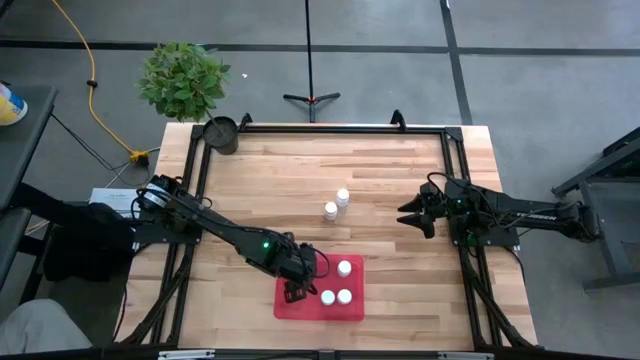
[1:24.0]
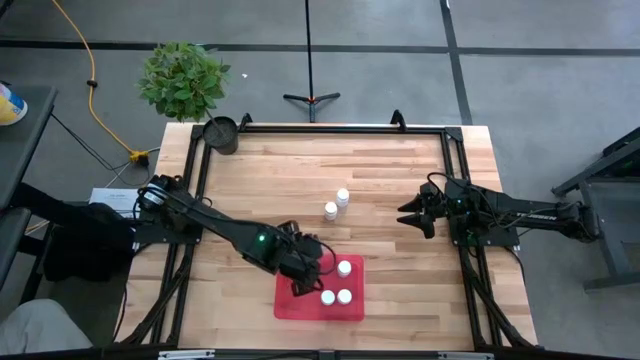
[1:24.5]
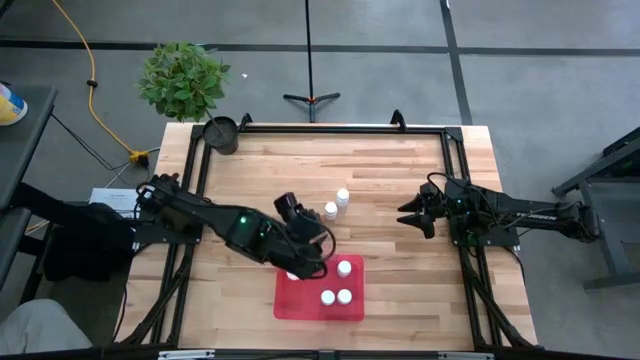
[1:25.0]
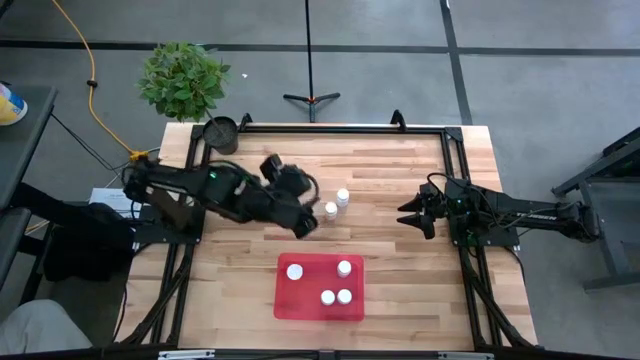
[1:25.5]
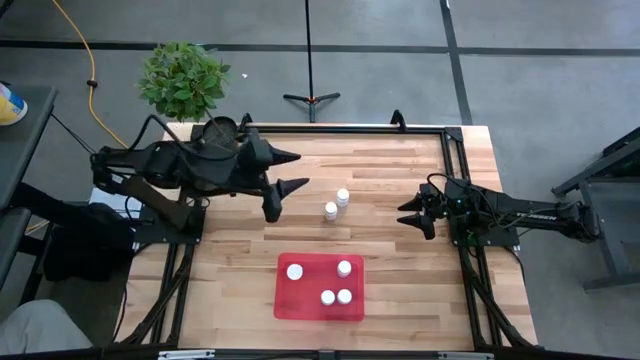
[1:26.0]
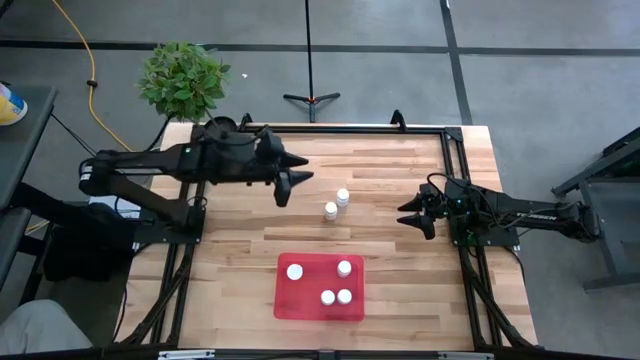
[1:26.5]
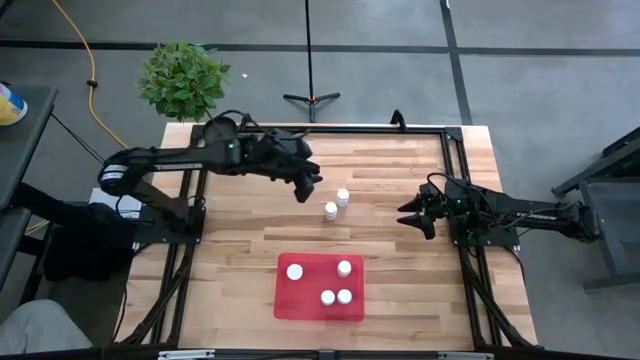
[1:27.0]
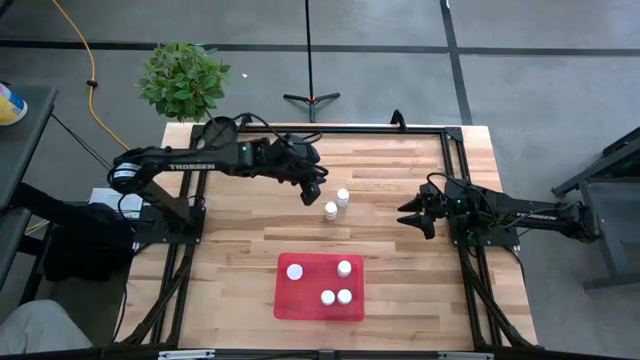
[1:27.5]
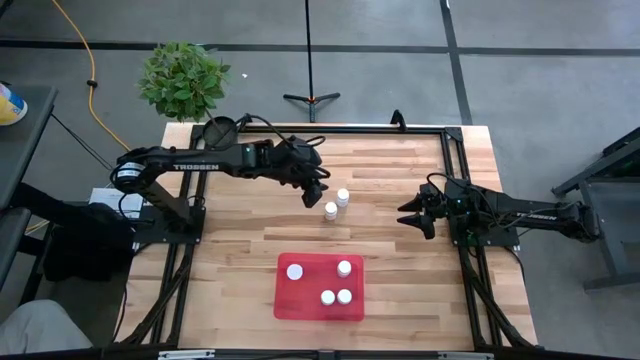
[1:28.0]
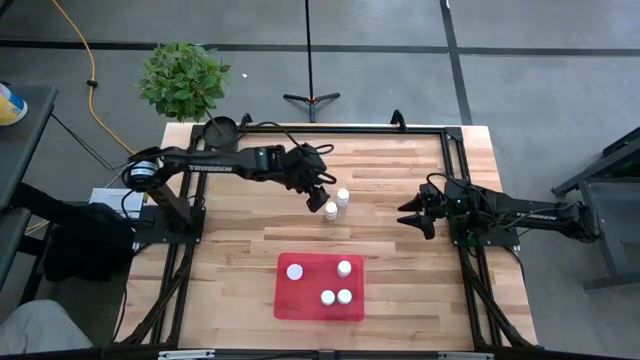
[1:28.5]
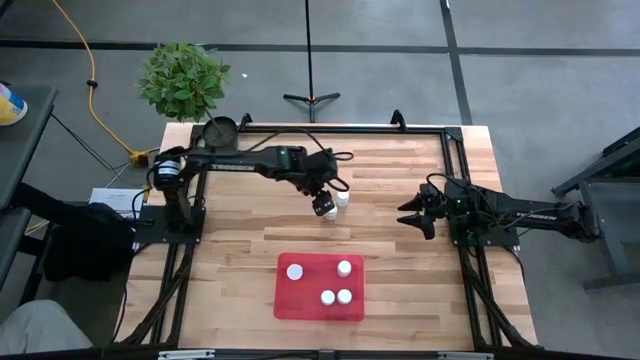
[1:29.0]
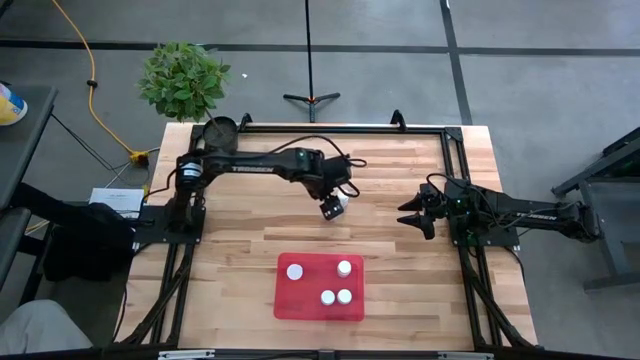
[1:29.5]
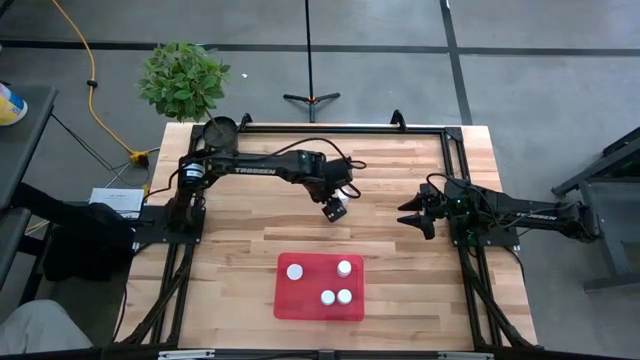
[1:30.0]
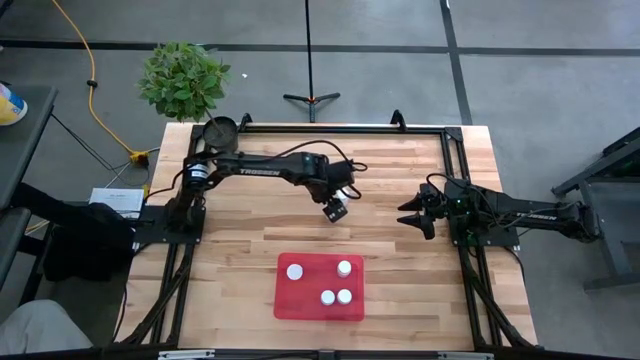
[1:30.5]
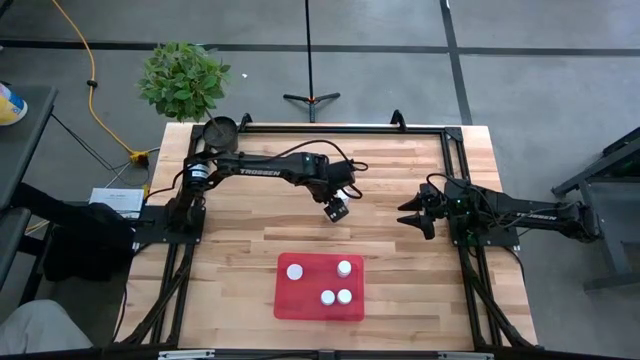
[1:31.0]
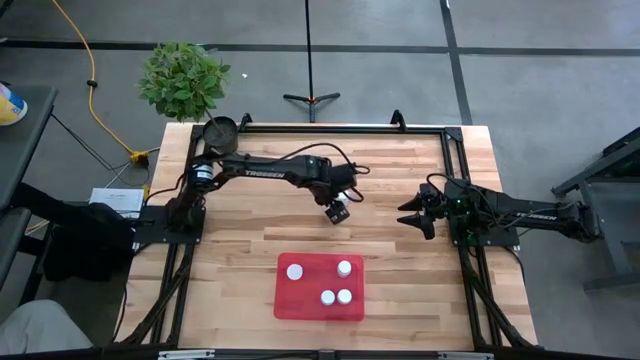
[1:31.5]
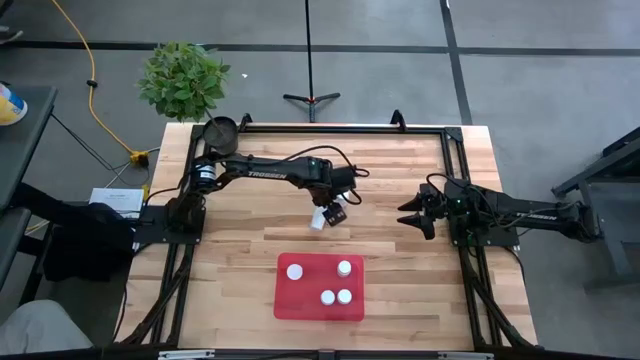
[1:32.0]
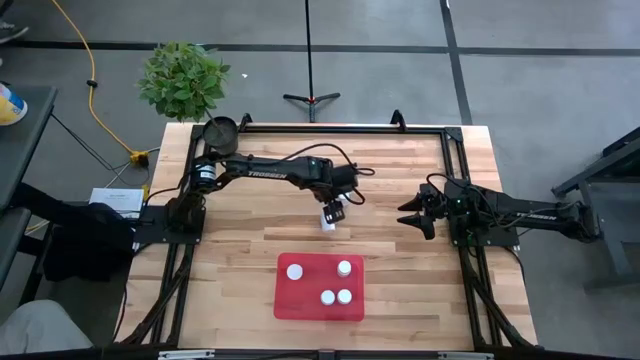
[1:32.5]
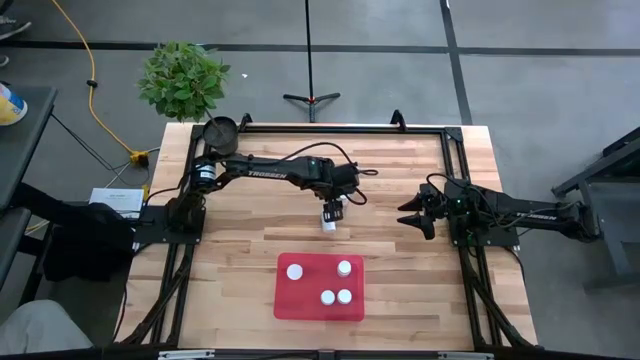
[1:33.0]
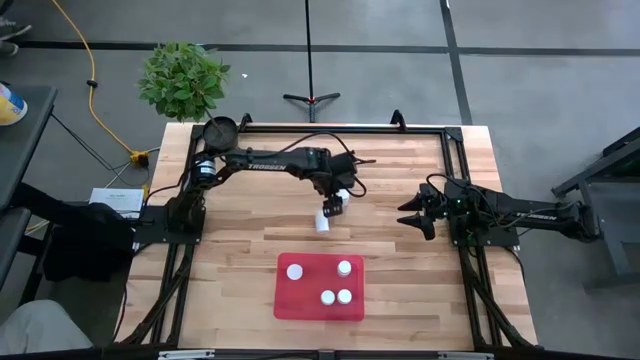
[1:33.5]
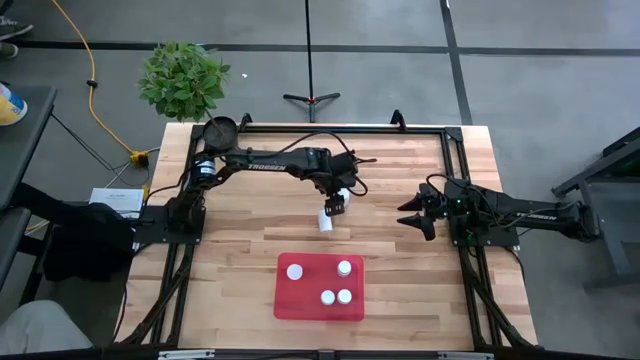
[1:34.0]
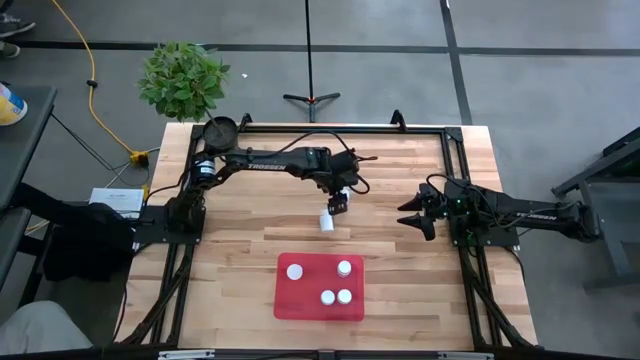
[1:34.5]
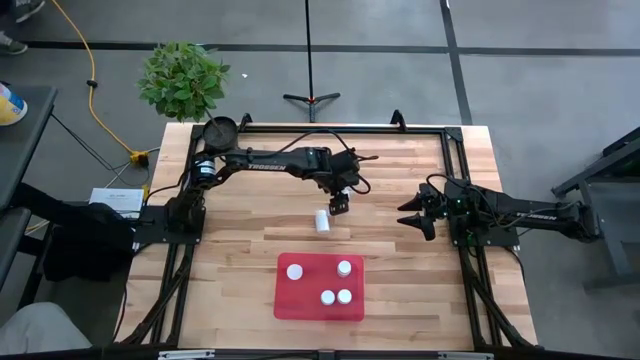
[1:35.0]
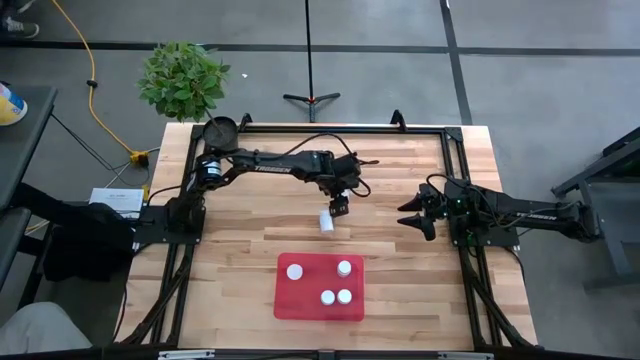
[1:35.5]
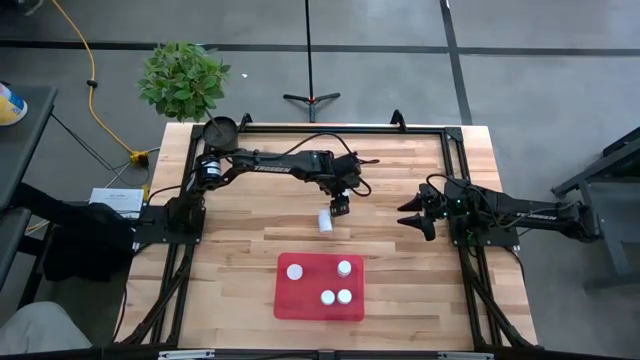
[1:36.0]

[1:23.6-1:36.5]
Task: Pick and place pill bottles into a basket
Put the bottom white pill bottle into the red bin

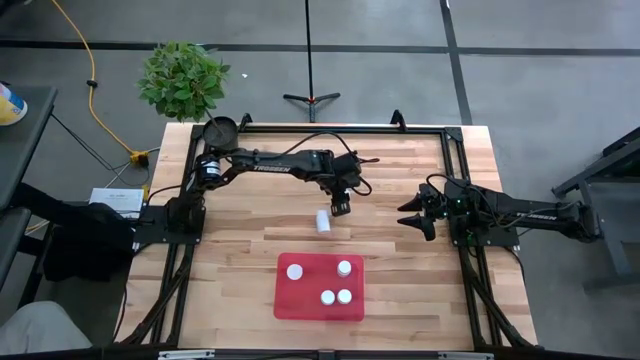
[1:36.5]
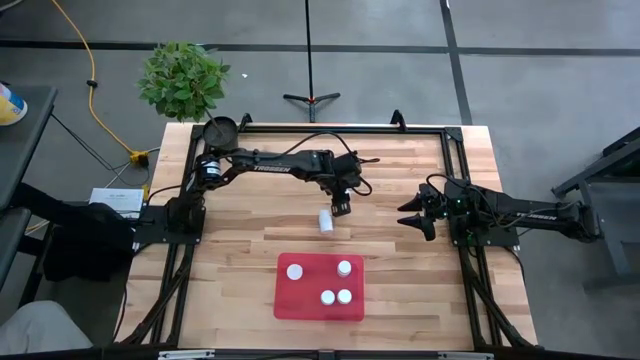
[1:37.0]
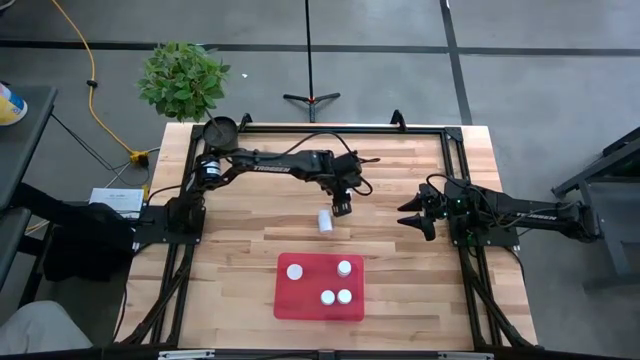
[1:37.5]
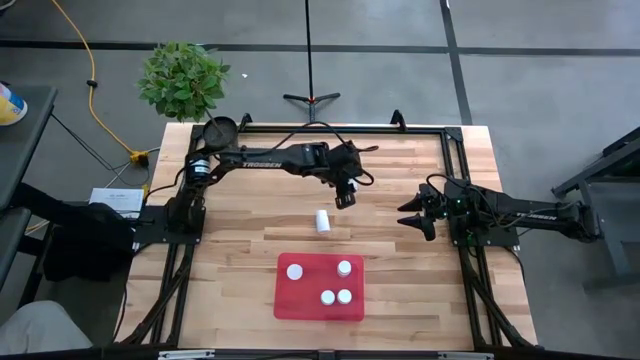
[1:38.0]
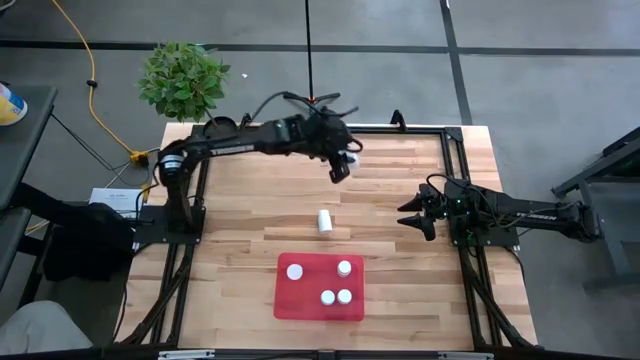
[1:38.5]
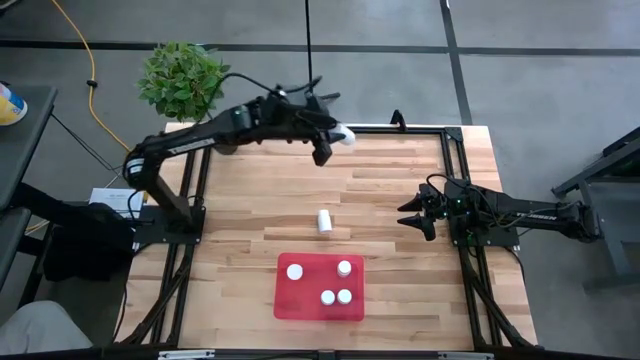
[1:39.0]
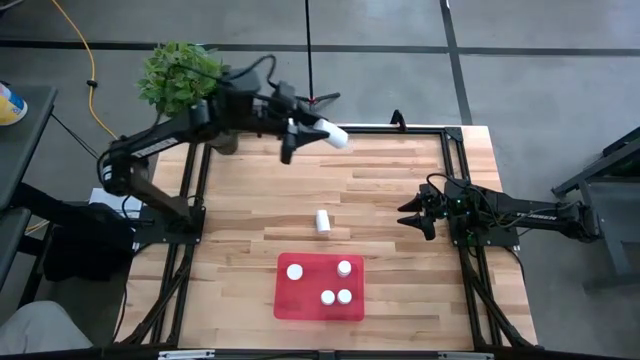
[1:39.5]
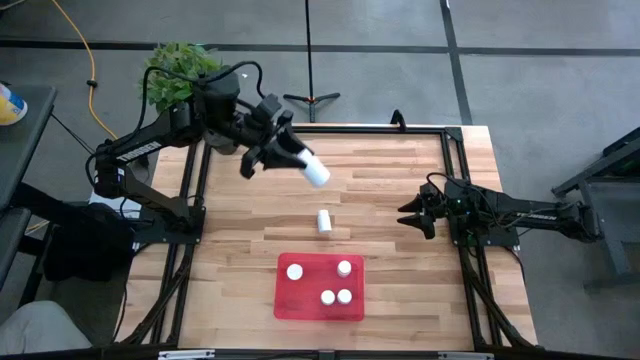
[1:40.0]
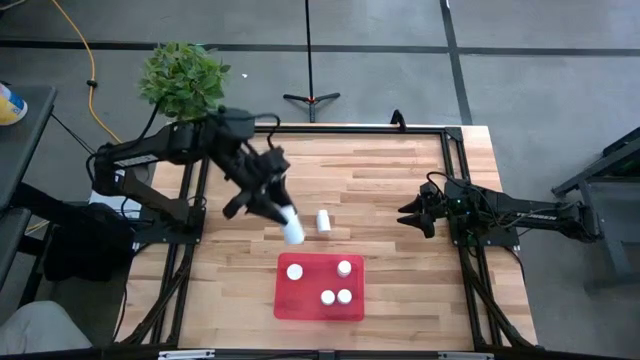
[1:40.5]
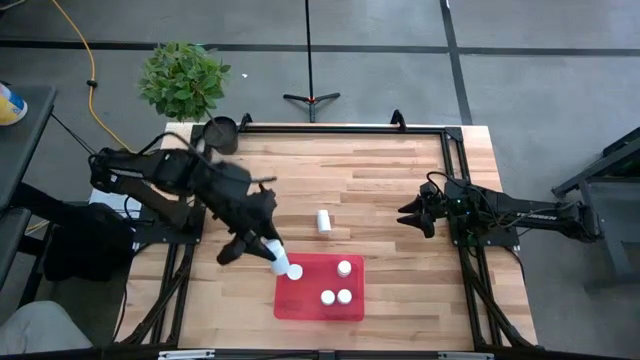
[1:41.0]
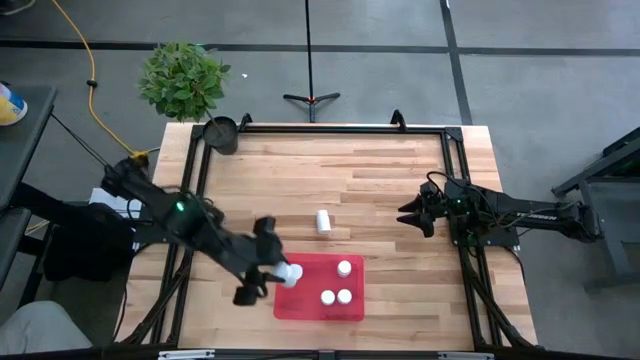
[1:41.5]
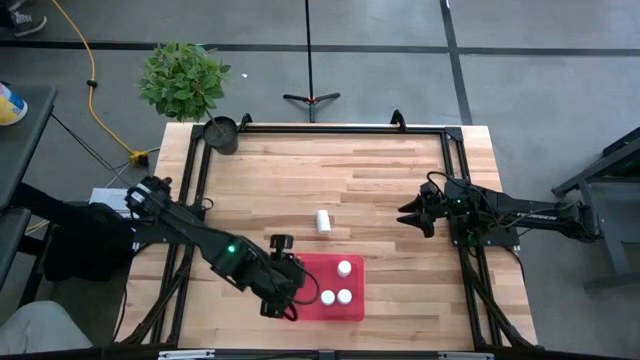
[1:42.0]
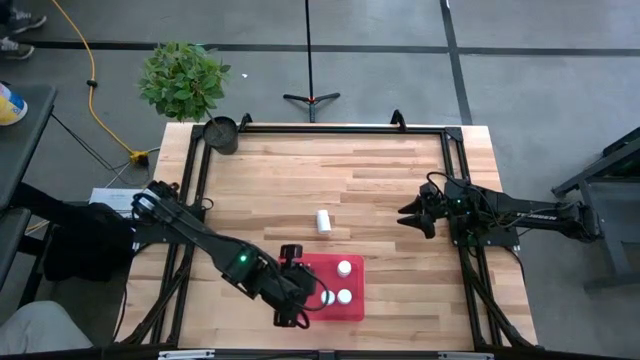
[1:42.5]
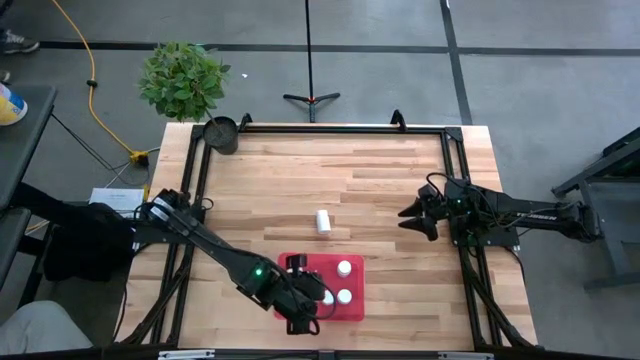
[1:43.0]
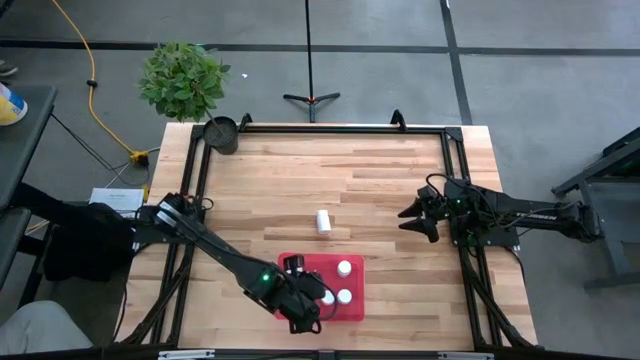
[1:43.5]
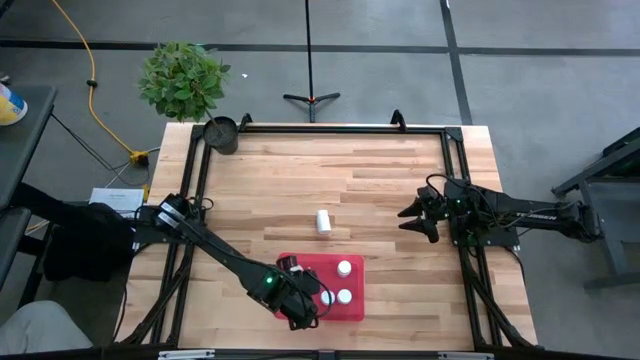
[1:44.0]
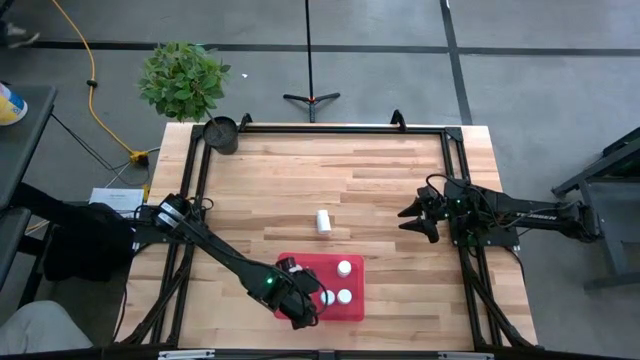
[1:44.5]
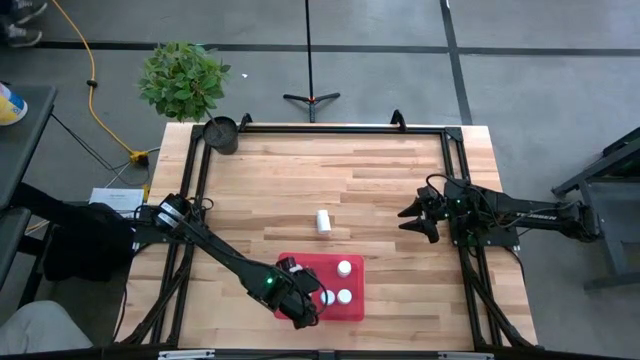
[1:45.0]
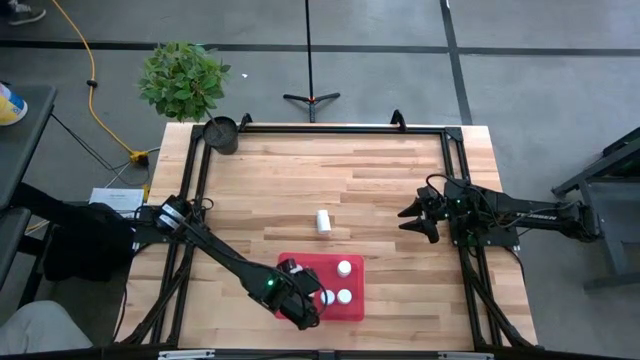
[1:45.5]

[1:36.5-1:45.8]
Put the top white pill bottle into the red bin
